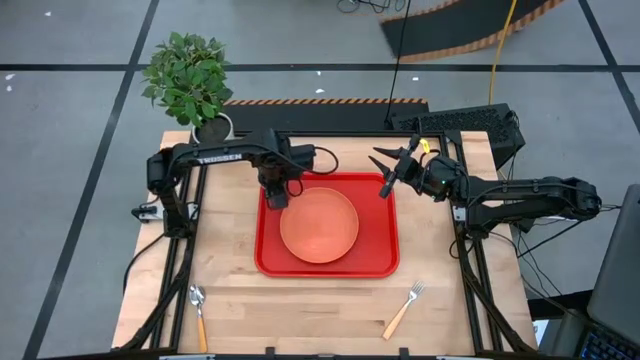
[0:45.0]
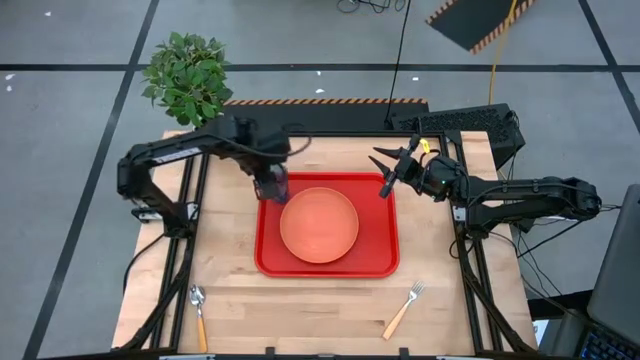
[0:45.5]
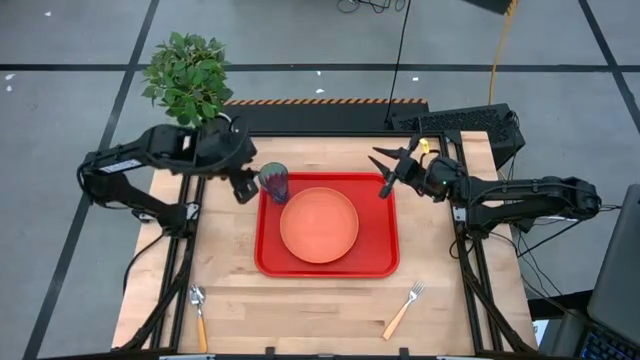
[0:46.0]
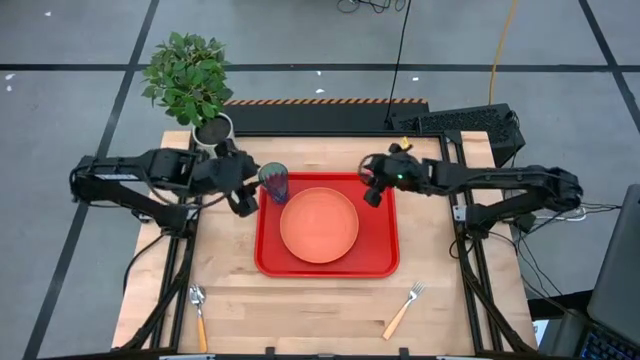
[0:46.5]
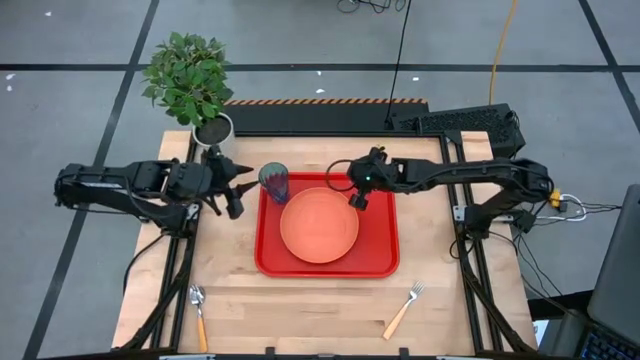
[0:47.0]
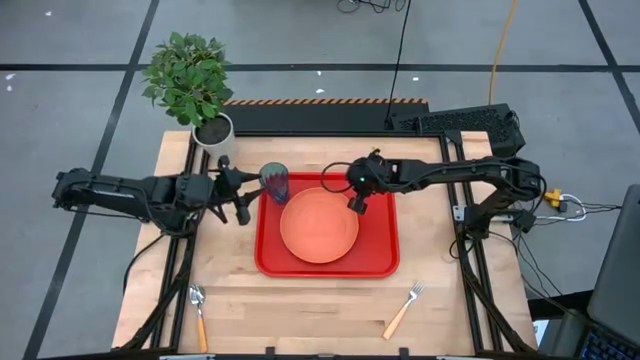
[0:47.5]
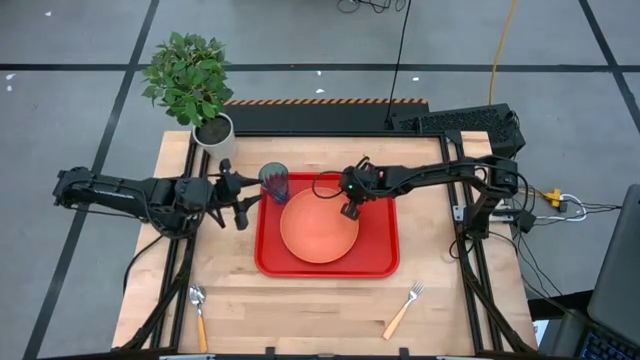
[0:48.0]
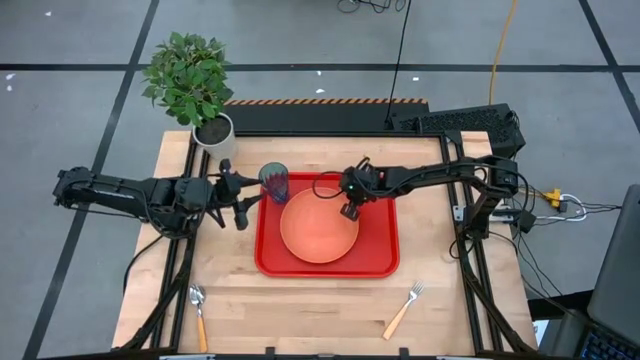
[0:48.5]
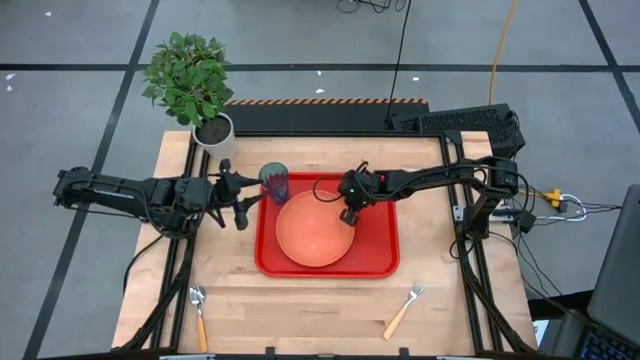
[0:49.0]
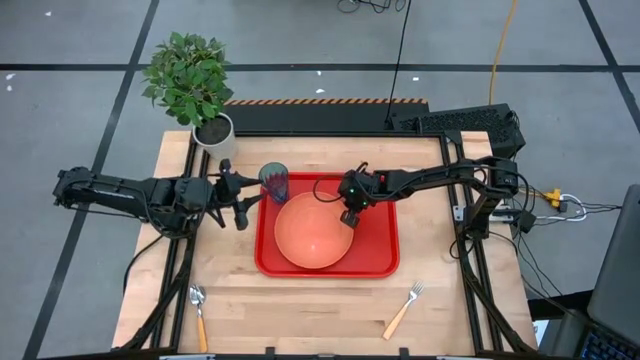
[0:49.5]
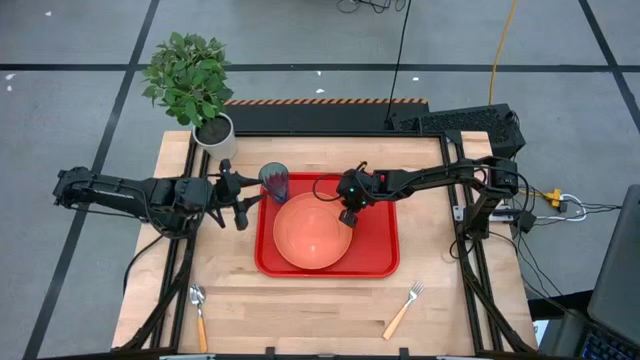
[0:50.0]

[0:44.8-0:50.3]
Task: Pick and place plate/cup/fork/spoon on tray
Adjust the orange plate on the red serving tray

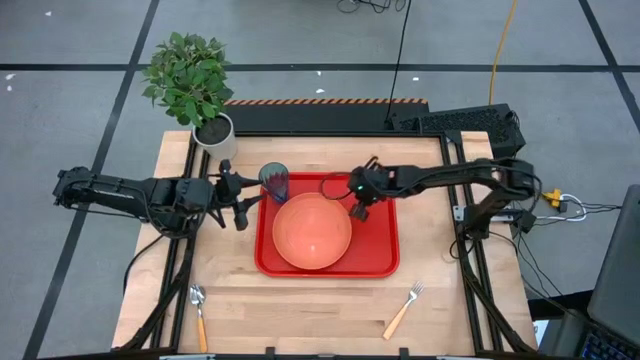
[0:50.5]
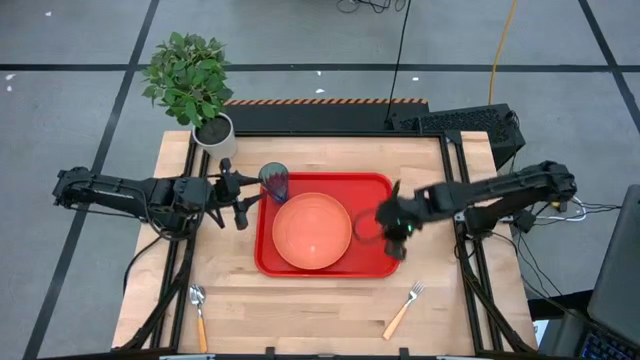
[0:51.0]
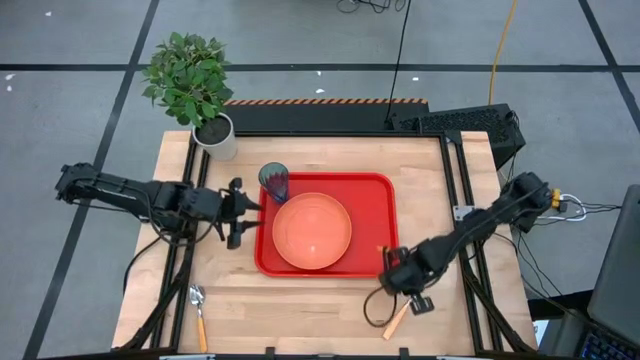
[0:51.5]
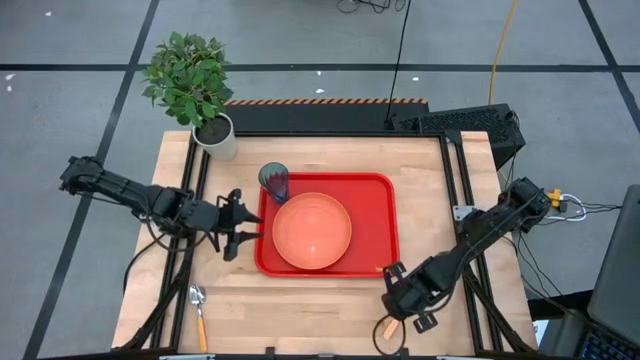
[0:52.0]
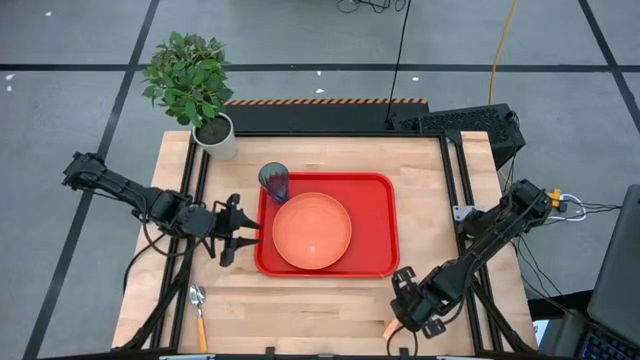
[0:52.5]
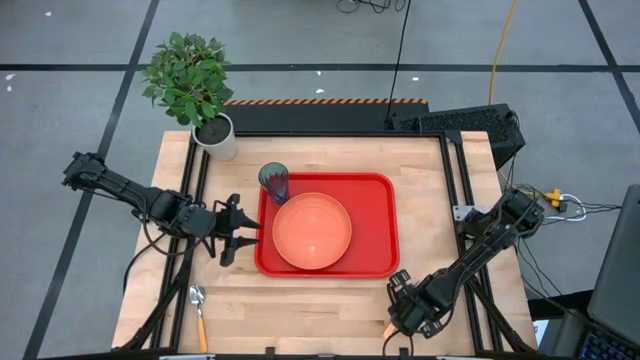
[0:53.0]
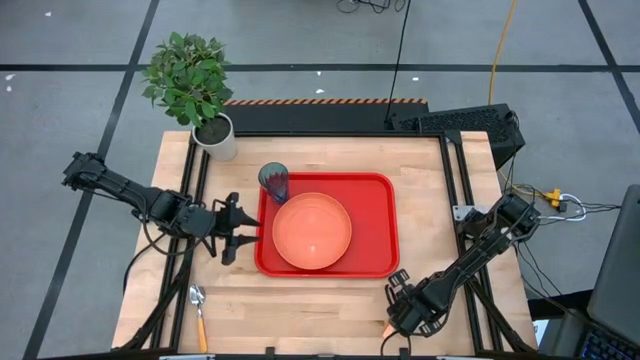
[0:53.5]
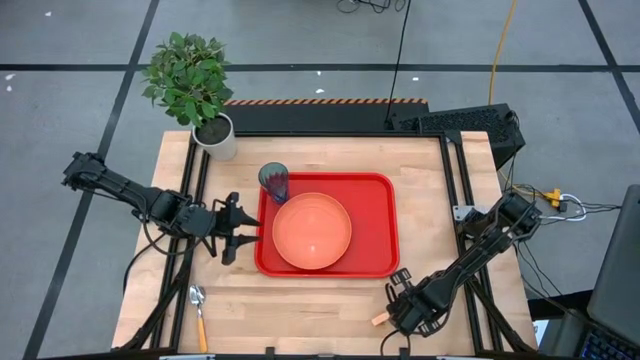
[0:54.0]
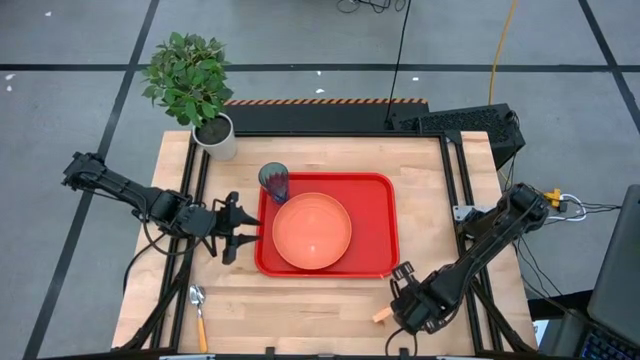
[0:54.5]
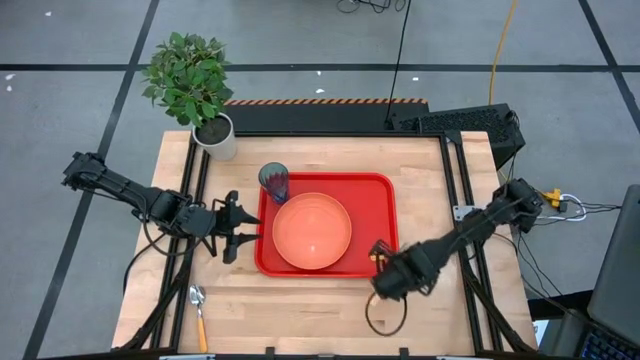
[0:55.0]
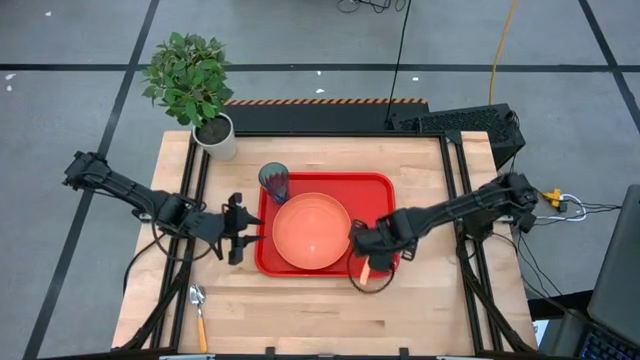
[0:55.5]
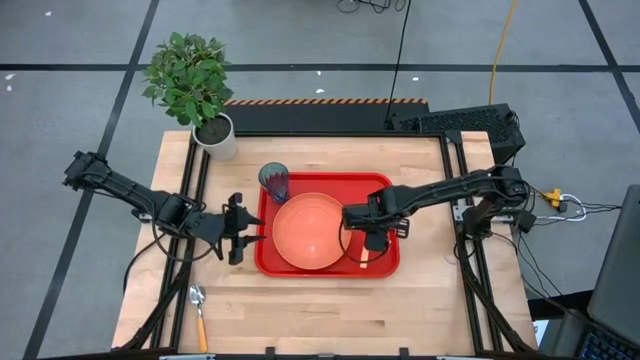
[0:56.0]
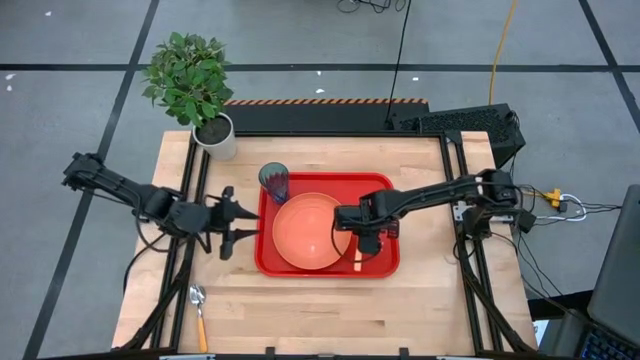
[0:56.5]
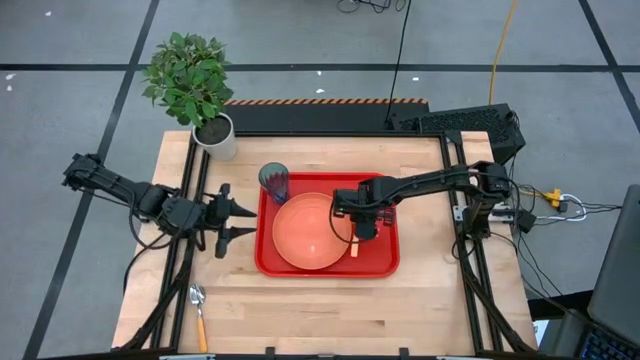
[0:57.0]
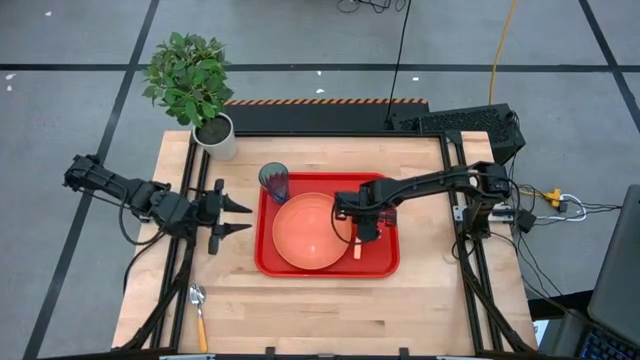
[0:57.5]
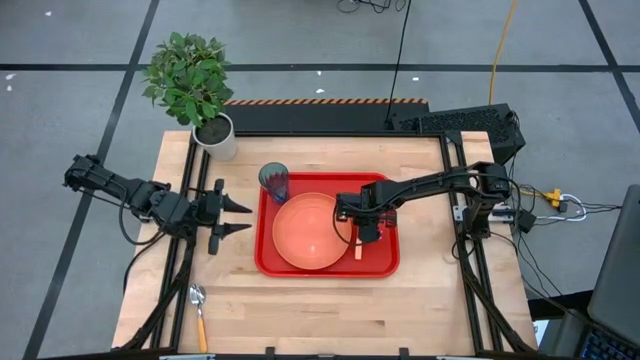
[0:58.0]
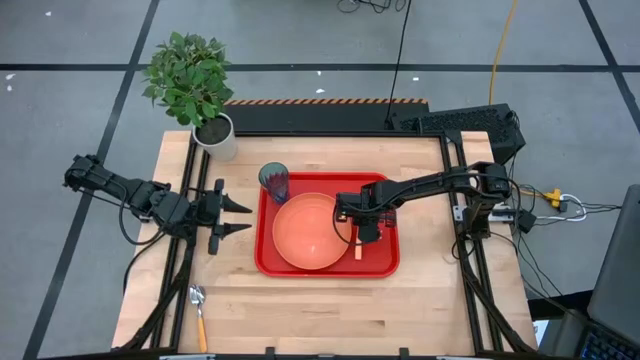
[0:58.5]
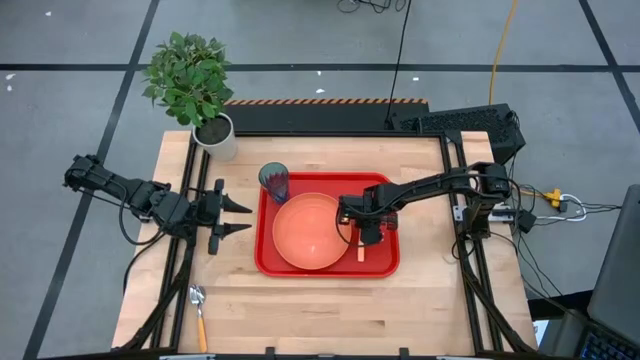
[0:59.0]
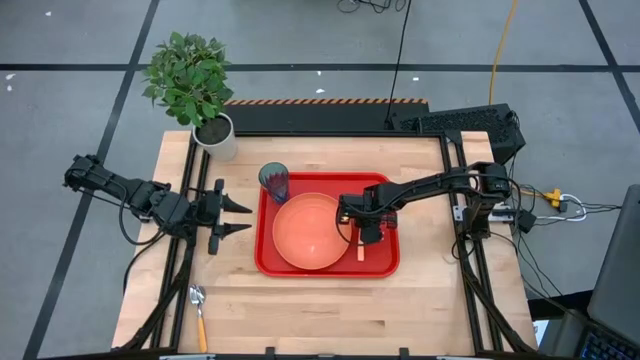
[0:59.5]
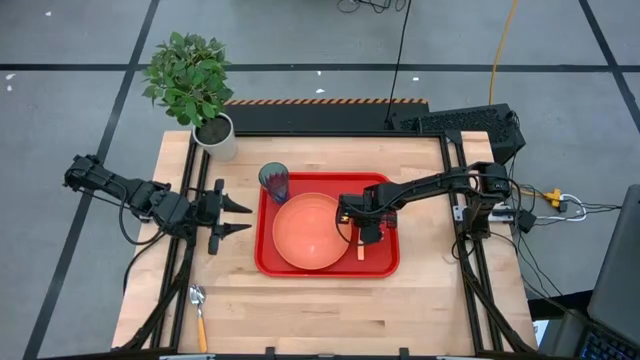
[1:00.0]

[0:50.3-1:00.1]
Put the yellow fork on the red serving tray to the right of the orange plate

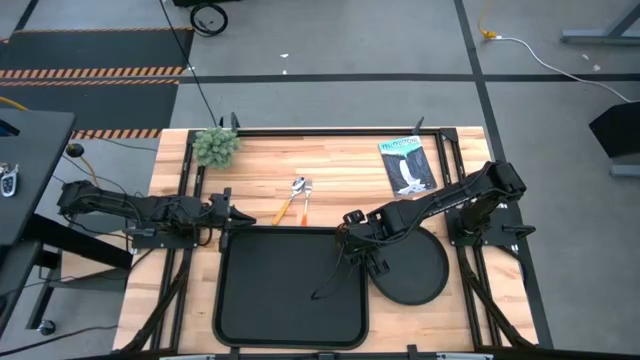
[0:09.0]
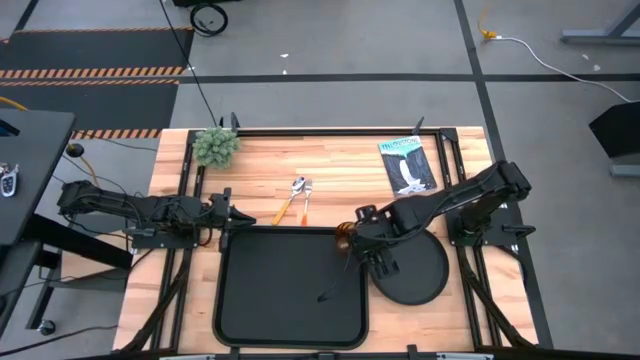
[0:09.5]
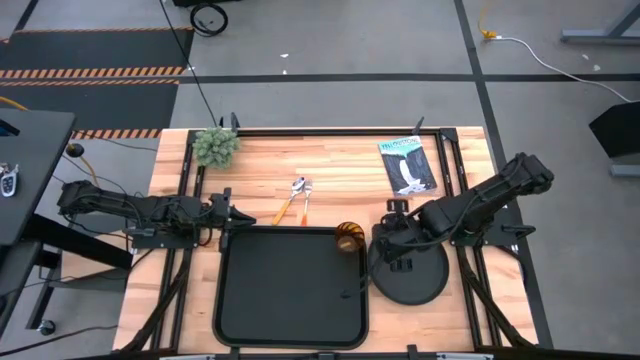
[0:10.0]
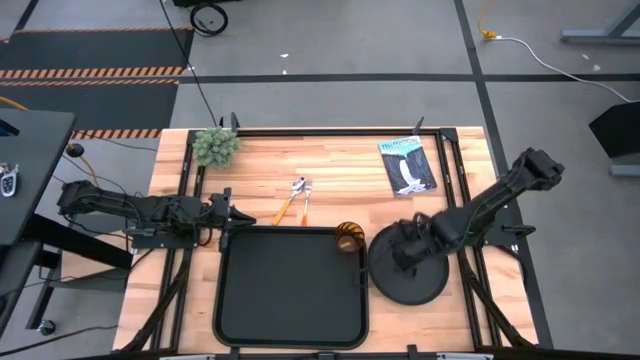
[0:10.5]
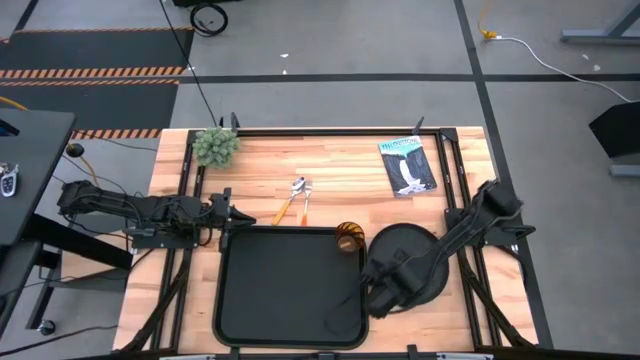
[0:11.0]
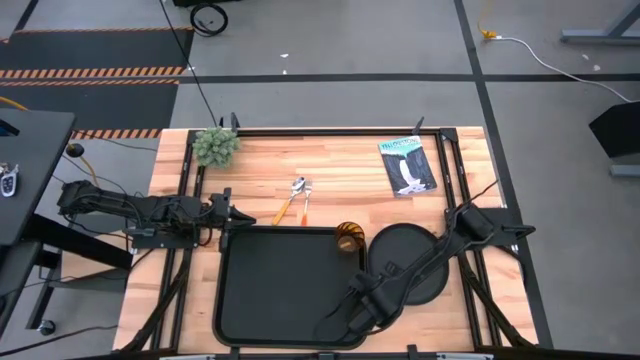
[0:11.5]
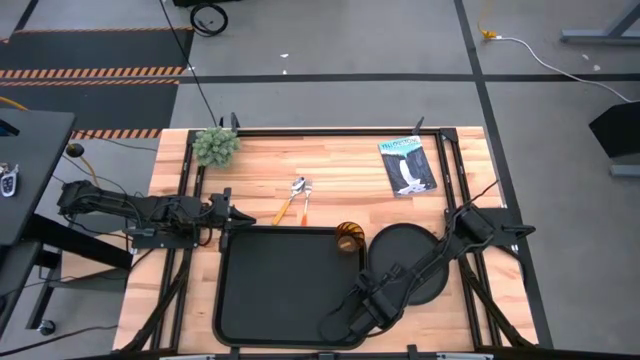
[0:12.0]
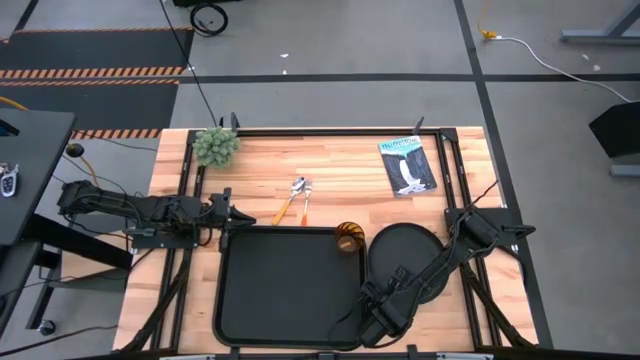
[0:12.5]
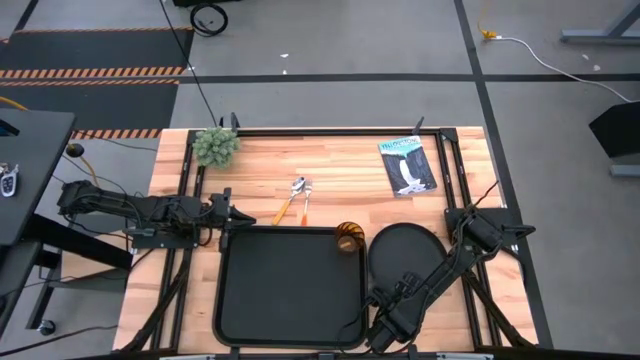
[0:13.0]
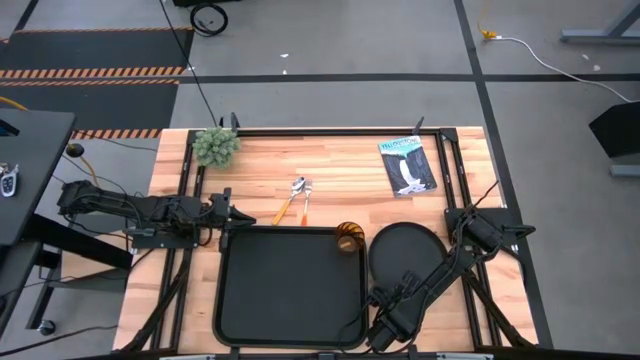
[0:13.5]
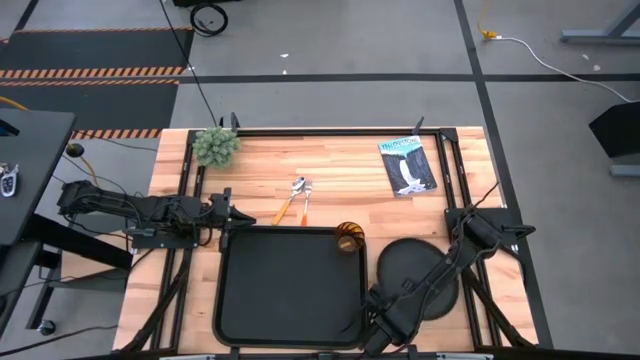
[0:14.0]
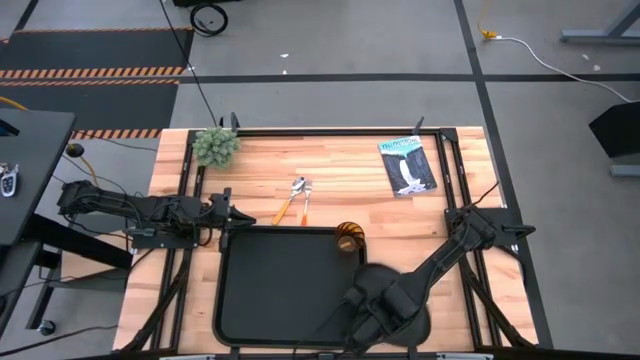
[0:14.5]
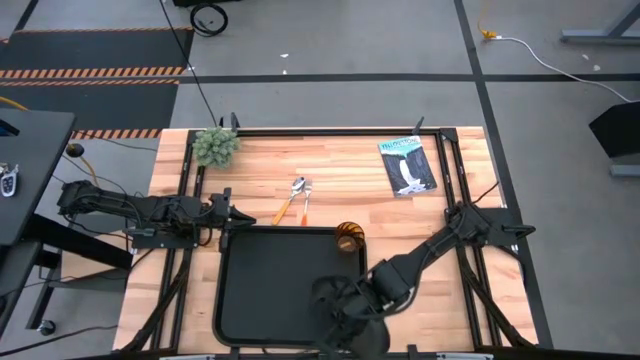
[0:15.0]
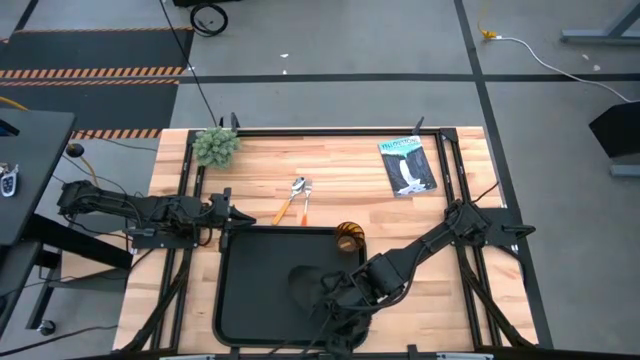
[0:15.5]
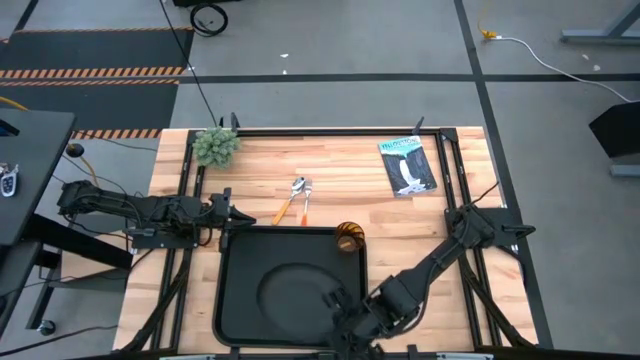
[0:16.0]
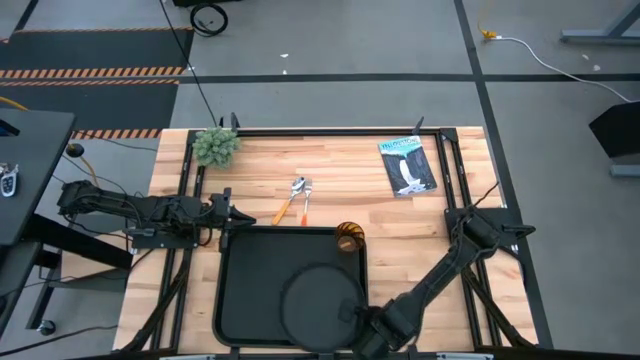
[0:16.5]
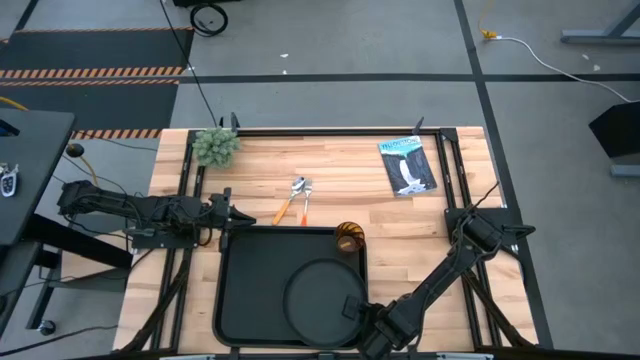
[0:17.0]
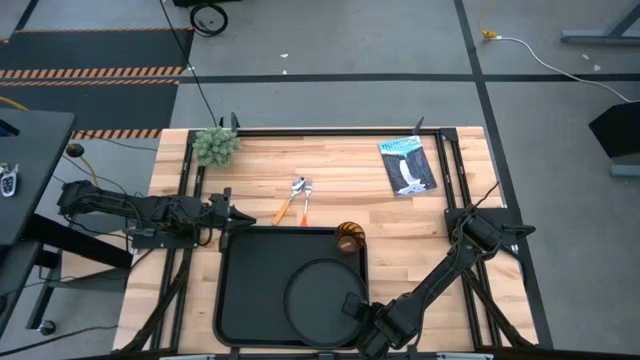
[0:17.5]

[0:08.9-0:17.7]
Task: Pick and place plate/cup/fork/spoon on tray
Put the black plate on the black tray
